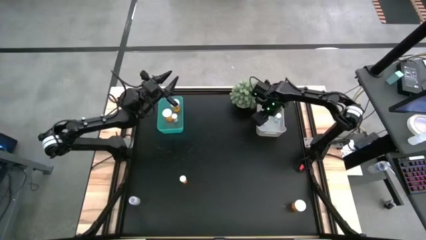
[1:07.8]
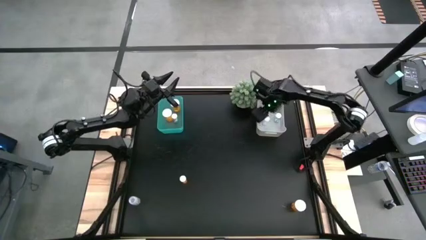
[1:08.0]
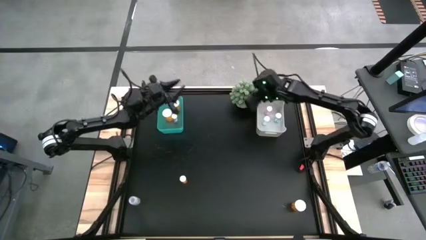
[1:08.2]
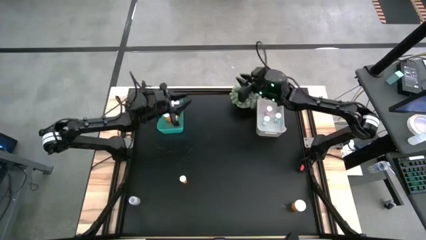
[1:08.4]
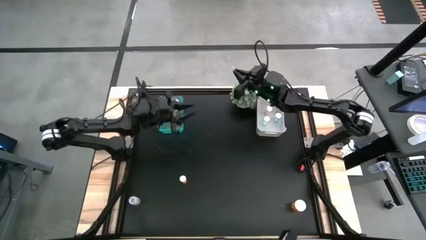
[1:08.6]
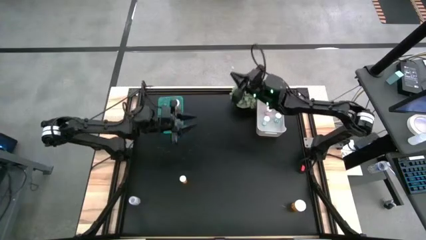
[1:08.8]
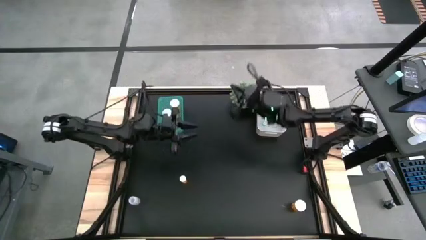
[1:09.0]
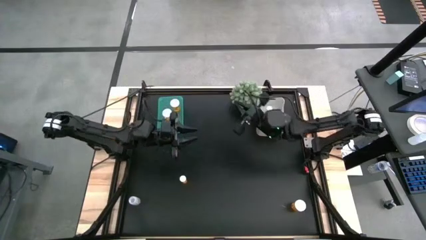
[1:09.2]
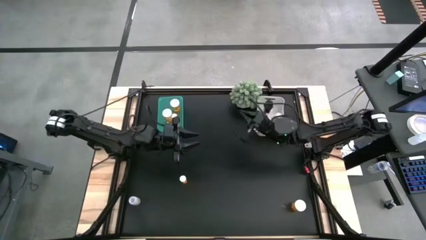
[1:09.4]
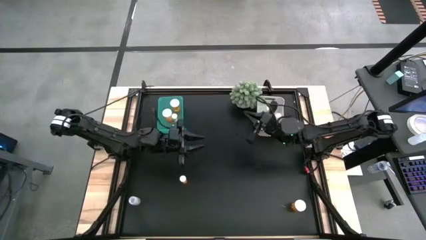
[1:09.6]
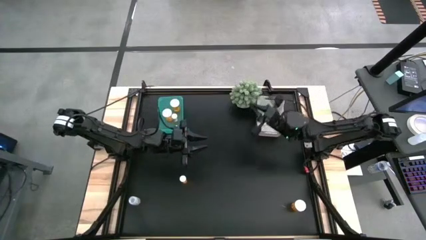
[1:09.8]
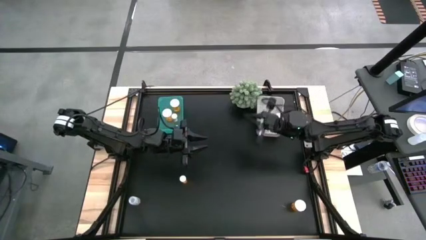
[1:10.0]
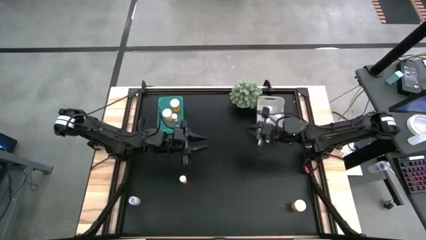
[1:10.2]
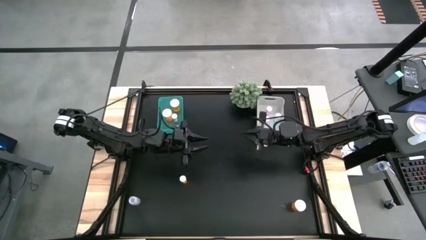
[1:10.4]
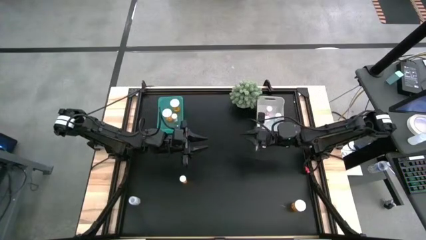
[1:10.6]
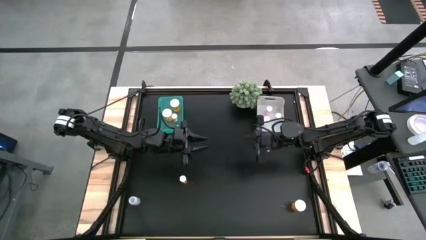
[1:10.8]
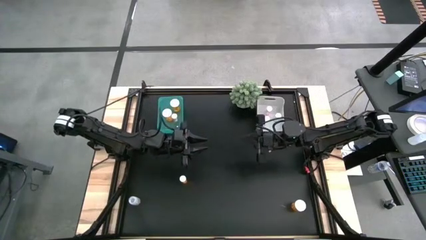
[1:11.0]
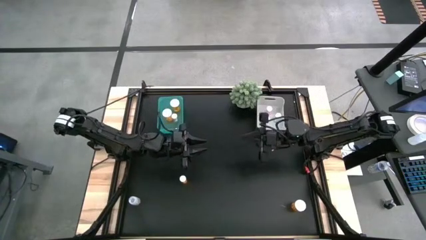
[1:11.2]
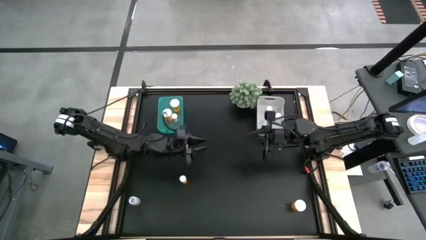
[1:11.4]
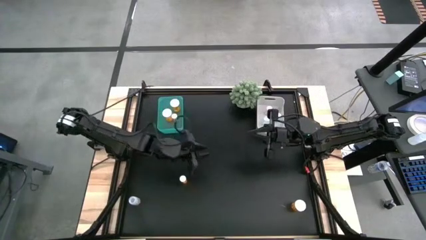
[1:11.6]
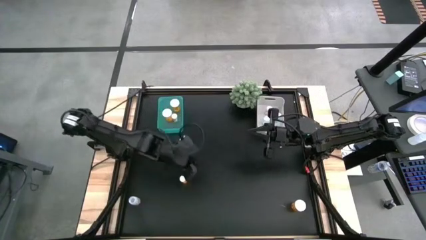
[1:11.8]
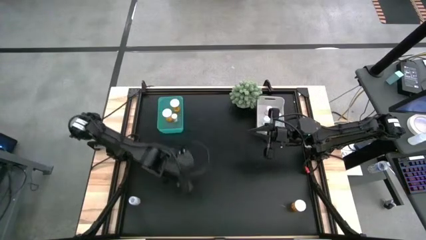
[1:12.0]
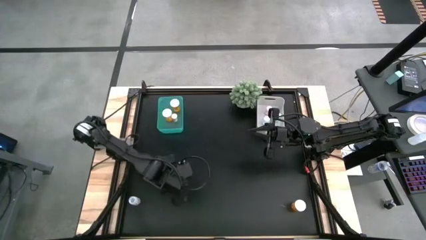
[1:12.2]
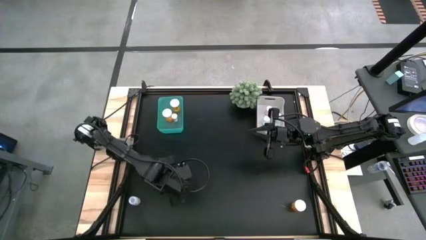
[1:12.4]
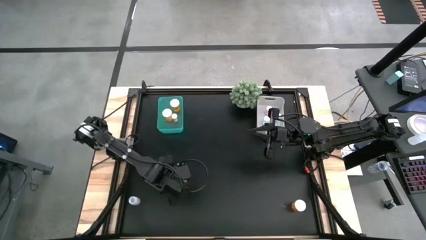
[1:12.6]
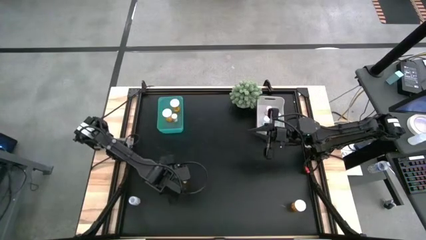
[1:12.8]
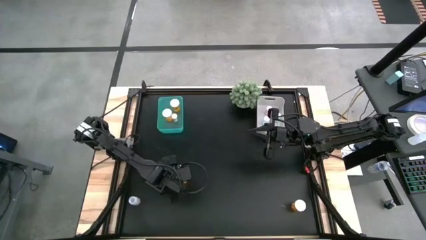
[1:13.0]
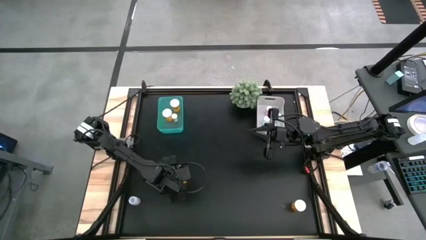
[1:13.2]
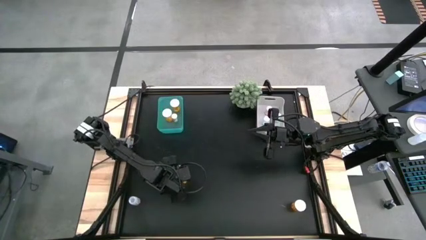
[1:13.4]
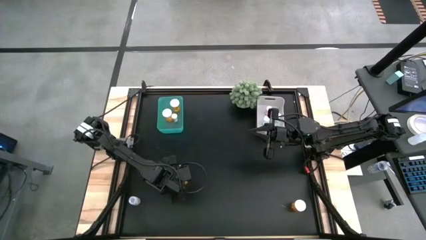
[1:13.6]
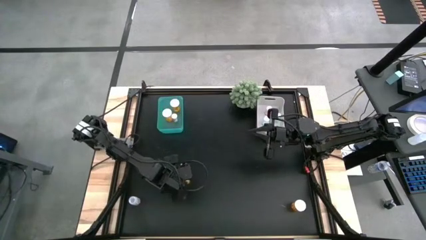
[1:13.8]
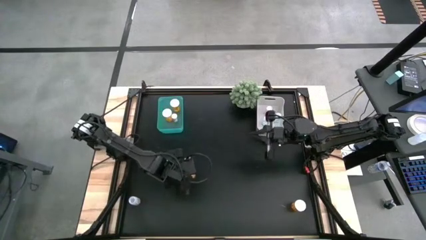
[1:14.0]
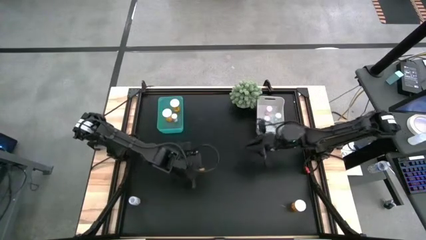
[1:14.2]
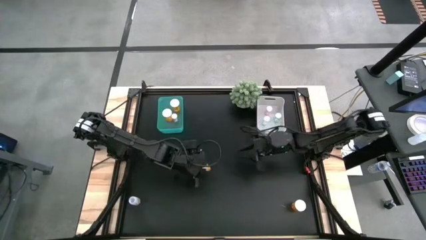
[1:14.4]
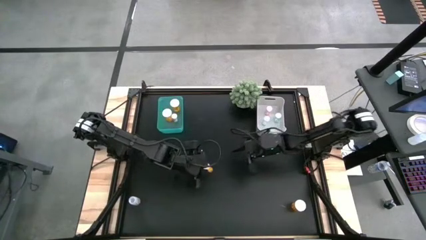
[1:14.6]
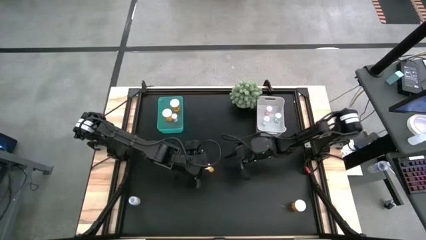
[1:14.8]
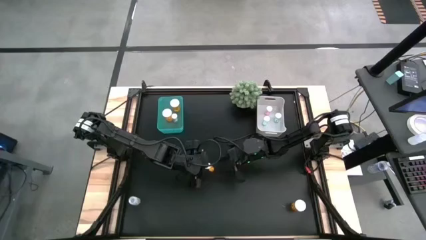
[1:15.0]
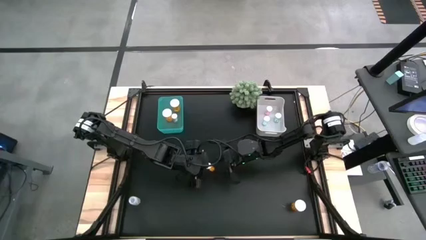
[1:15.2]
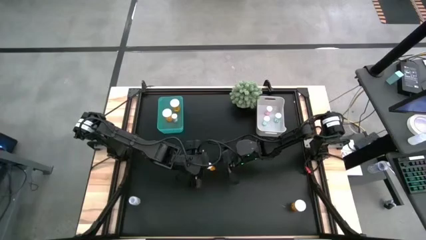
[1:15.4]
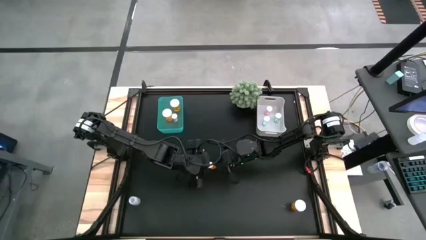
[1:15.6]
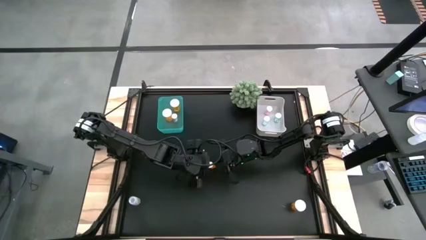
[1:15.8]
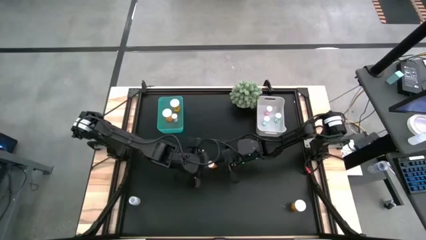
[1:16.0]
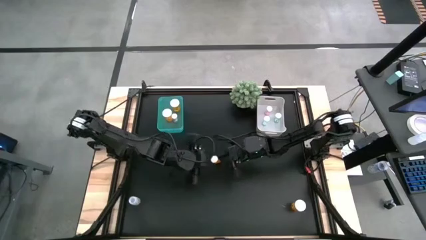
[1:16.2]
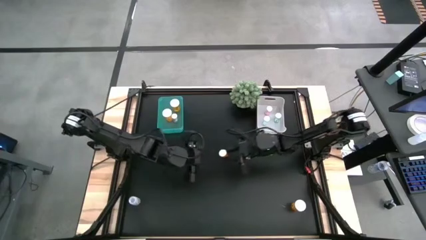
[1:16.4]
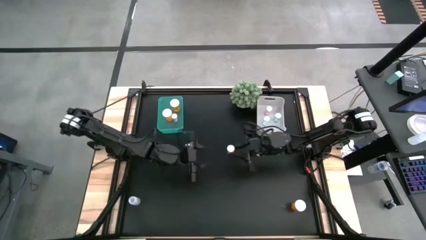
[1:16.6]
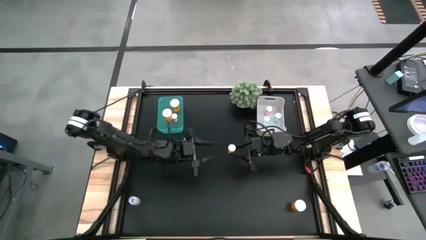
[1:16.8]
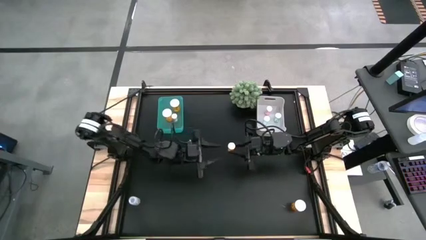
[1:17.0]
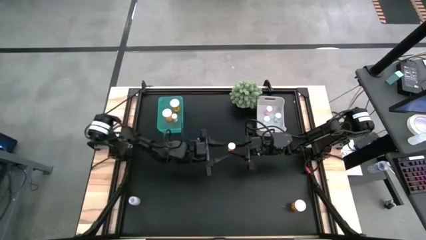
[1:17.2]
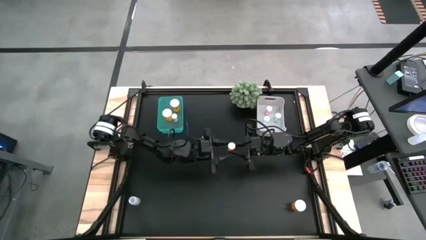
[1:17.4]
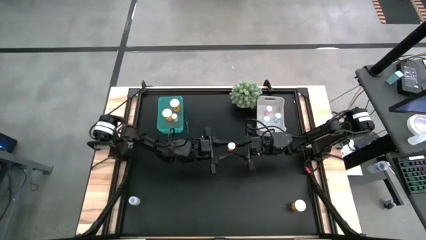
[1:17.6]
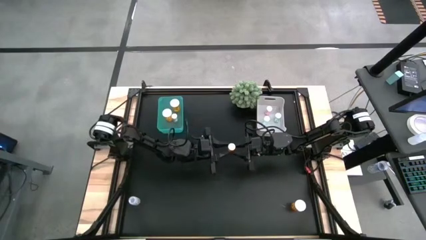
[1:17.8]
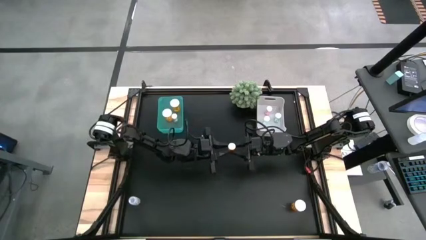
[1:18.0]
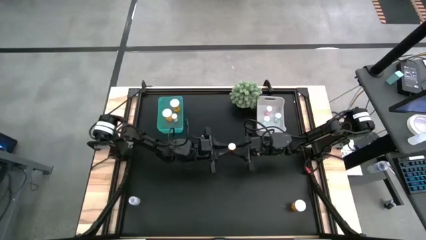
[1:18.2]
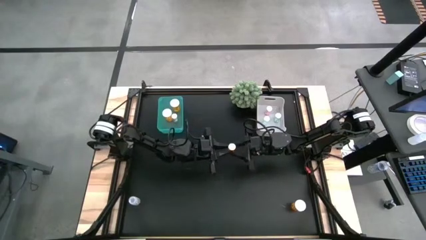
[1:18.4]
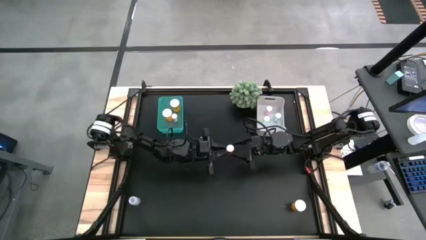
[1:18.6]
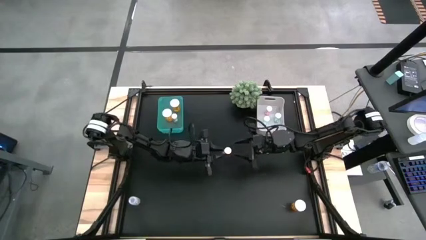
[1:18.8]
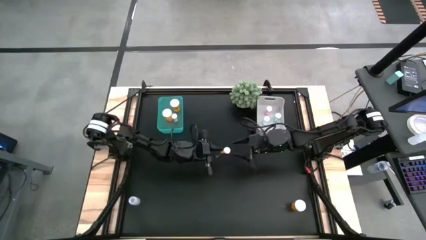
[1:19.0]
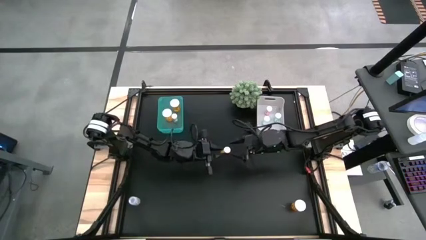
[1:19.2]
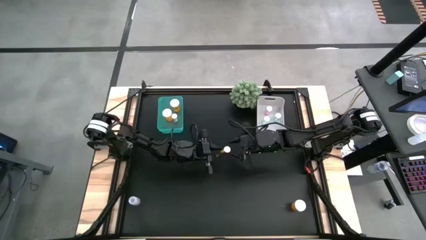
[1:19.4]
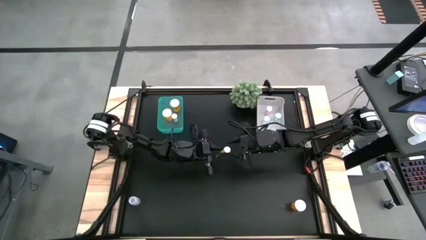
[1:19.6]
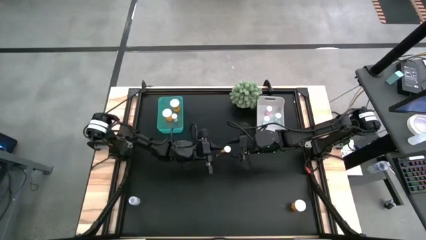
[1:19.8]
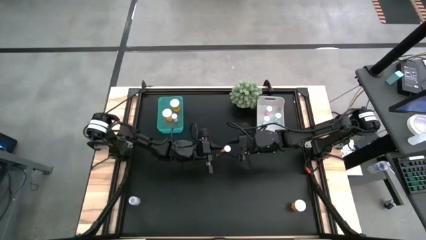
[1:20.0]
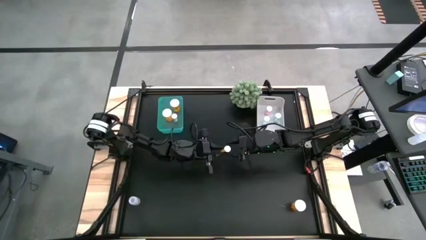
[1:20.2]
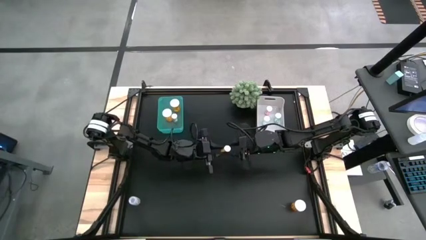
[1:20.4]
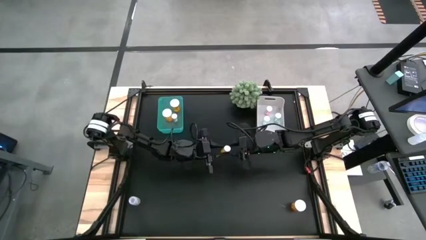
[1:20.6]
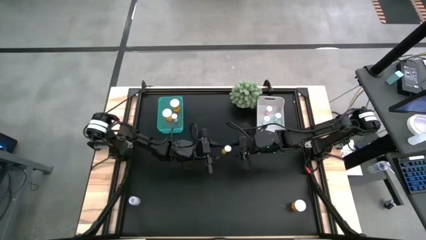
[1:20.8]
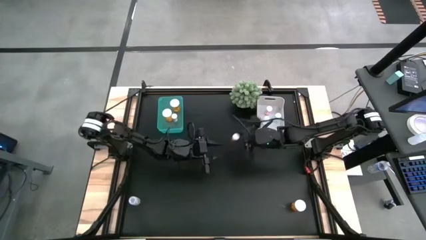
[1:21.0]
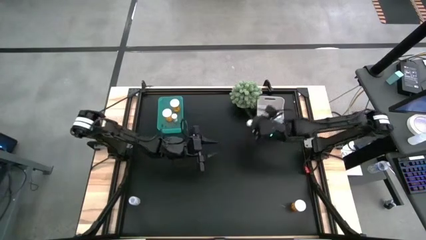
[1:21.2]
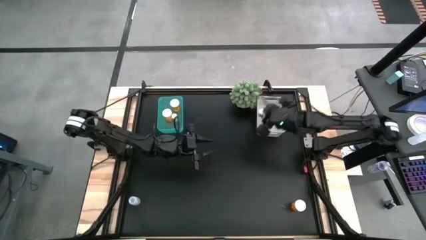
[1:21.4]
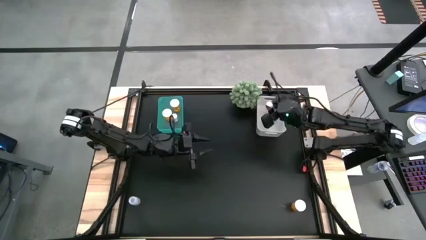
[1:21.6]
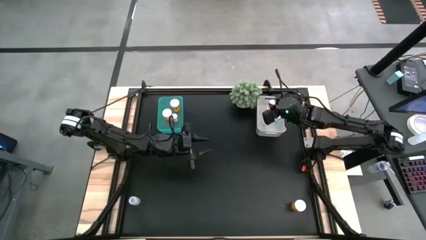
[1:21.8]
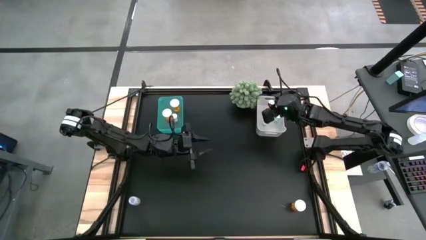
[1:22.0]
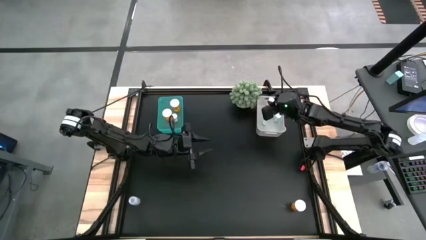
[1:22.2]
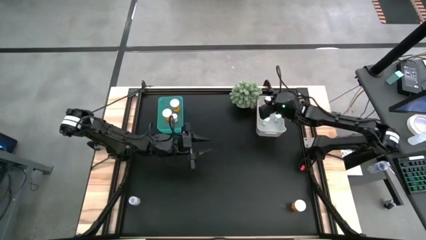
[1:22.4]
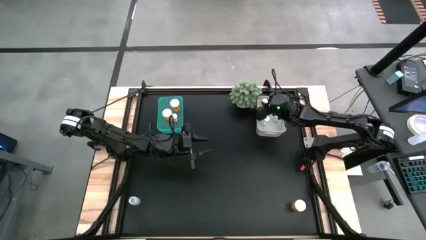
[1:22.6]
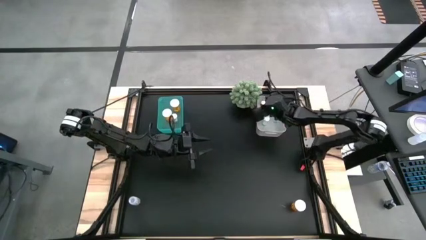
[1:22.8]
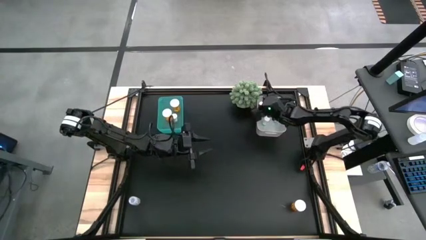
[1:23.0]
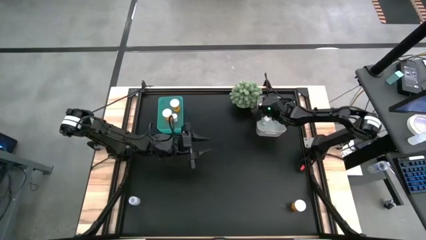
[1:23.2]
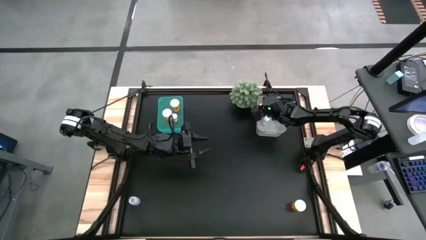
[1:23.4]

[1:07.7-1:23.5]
Task: Pick and place medicine bottles into bin by pill shape (circle, oval)
Put the orange tablet bottle into the white bin

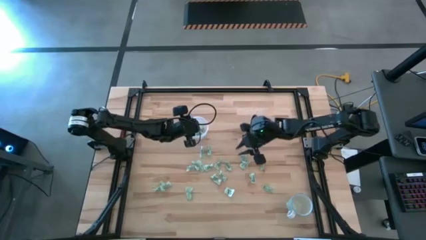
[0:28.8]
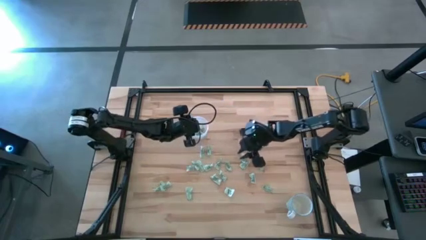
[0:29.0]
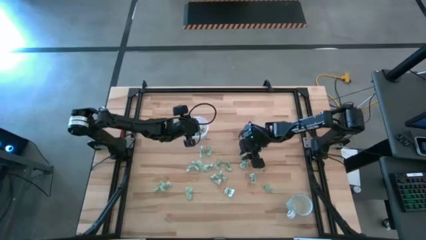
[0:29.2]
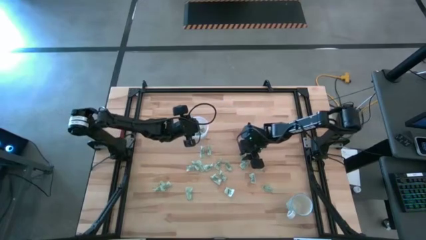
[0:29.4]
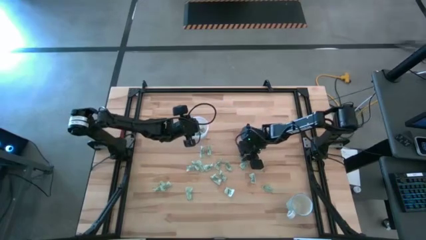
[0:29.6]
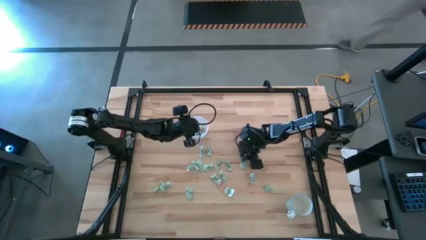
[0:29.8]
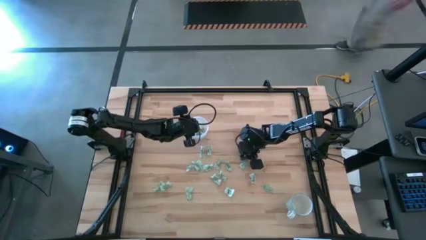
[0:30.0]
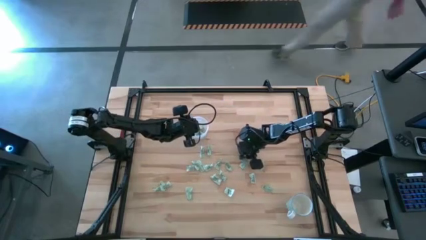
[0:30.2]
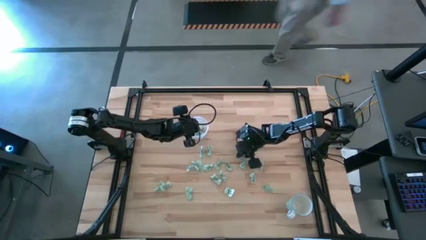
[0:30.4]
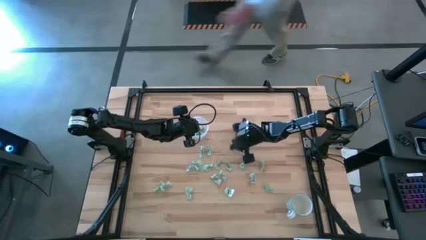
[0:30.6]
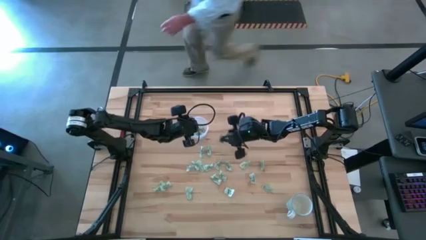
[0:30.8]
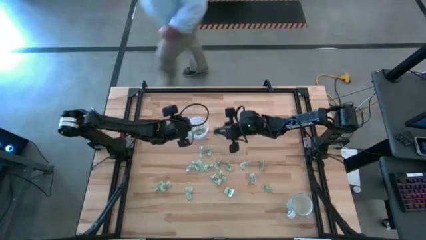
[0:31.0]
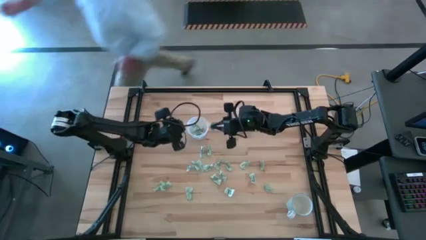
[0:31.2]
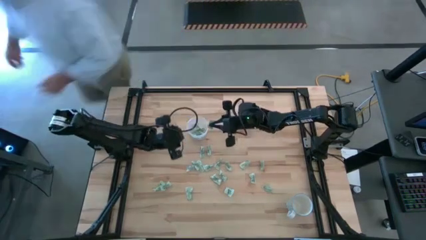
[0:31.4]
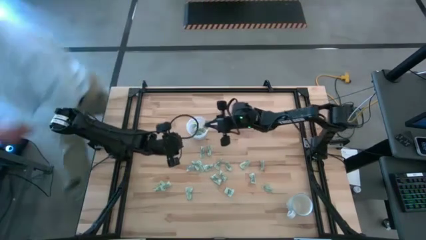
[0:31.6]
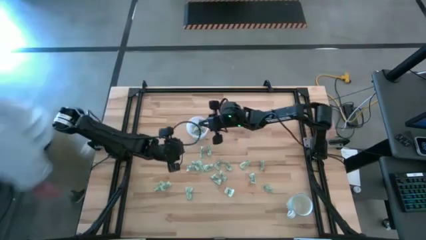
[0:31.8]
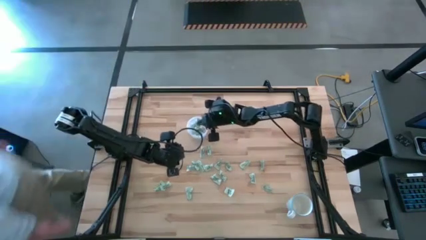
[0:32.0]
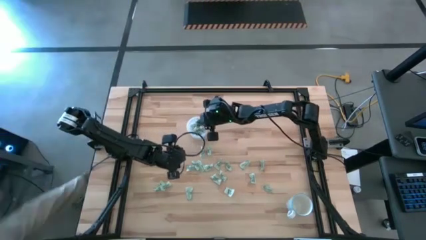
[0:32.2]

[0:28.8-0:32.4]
Task: Pick and place Stevia / Truvia into bins
Put the stevia packet into the transparent container
